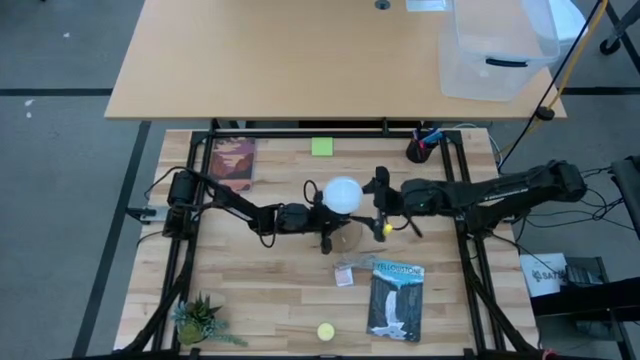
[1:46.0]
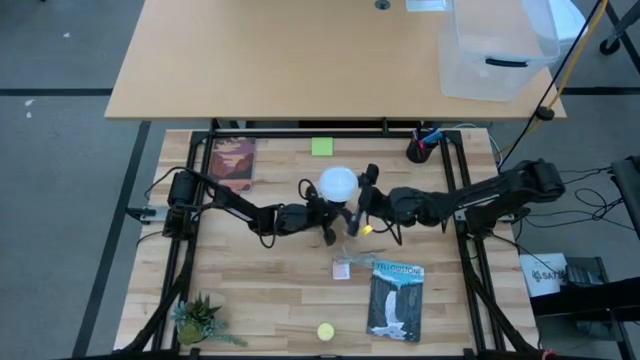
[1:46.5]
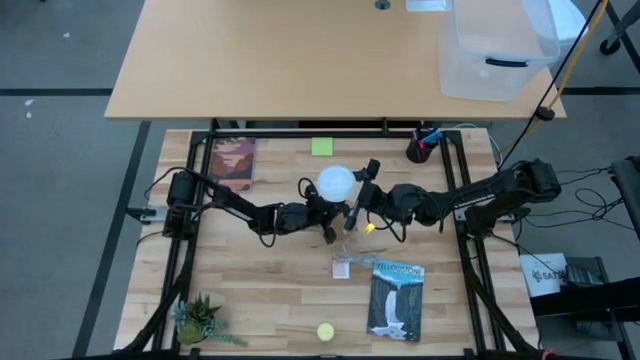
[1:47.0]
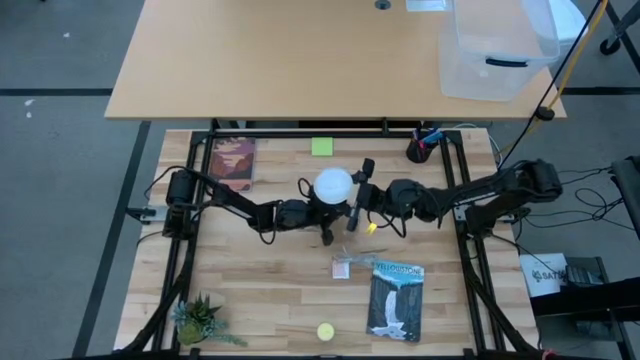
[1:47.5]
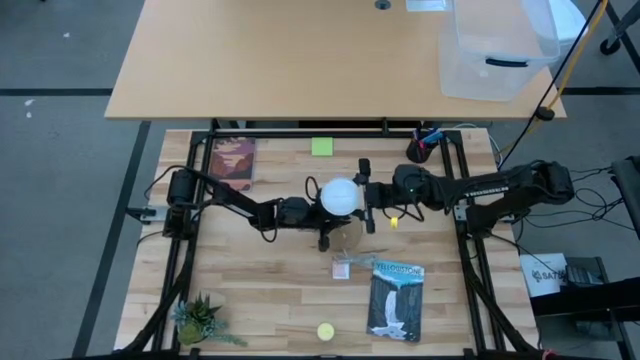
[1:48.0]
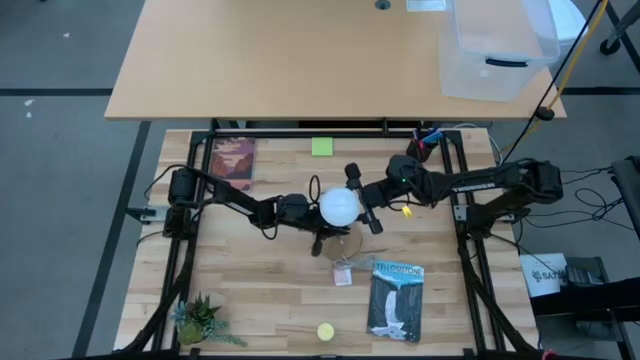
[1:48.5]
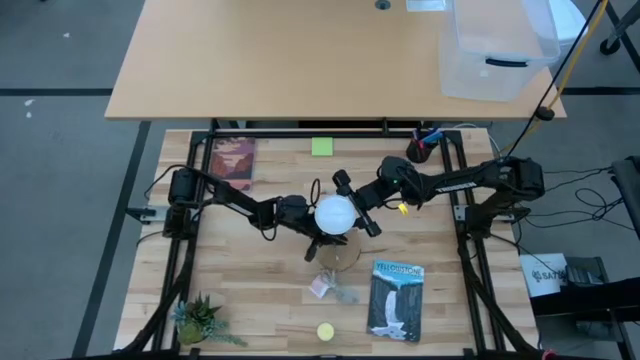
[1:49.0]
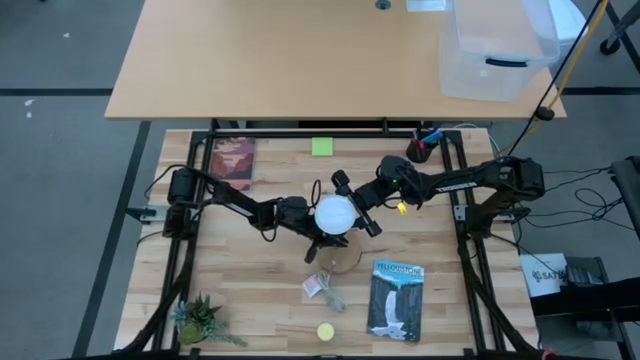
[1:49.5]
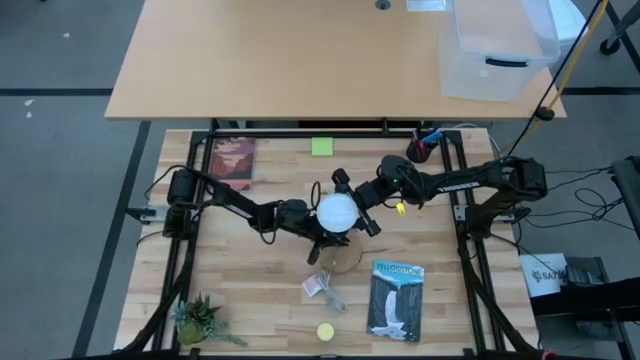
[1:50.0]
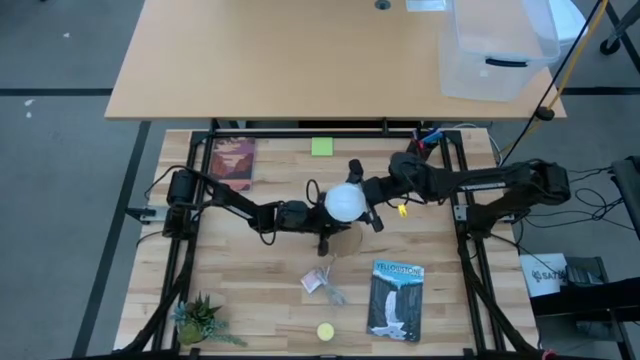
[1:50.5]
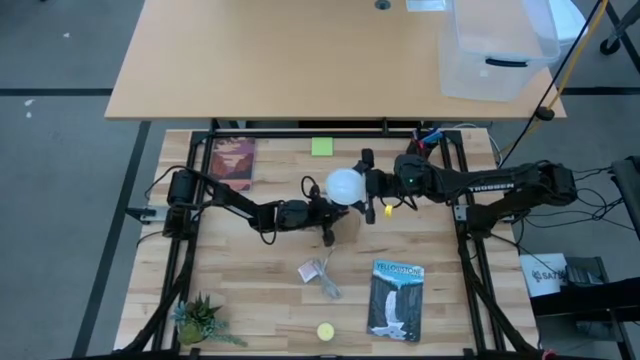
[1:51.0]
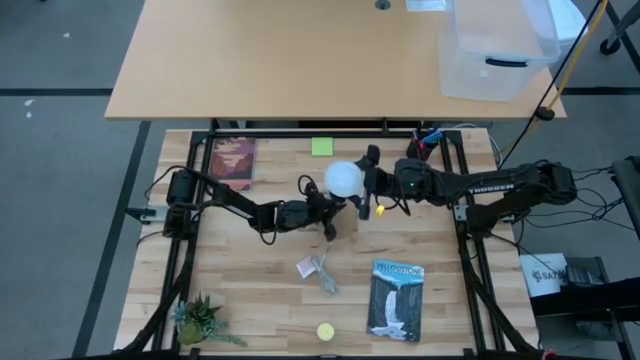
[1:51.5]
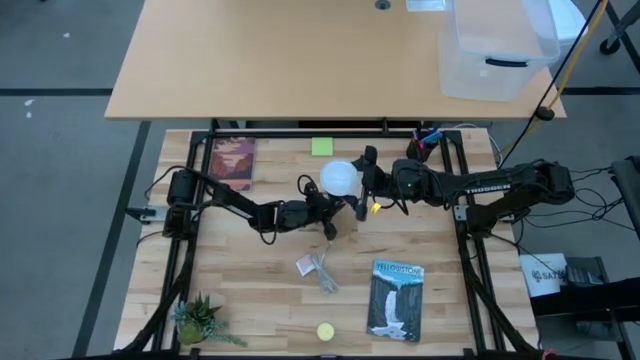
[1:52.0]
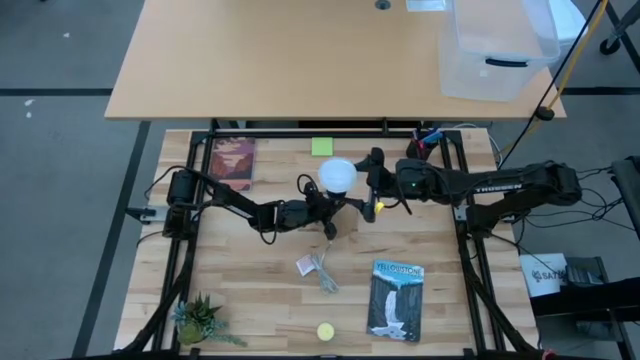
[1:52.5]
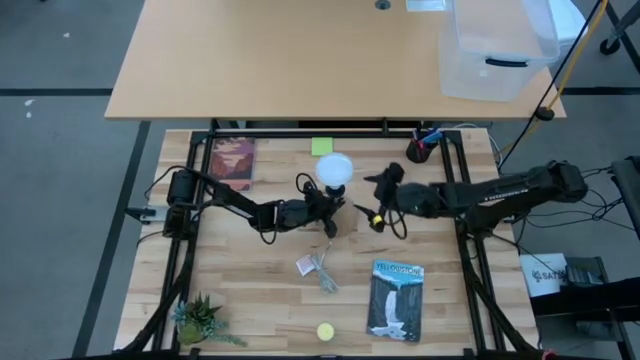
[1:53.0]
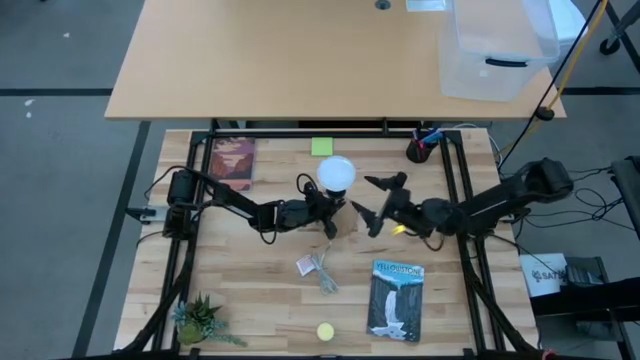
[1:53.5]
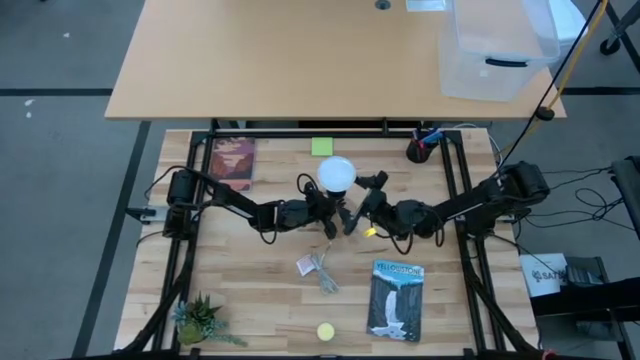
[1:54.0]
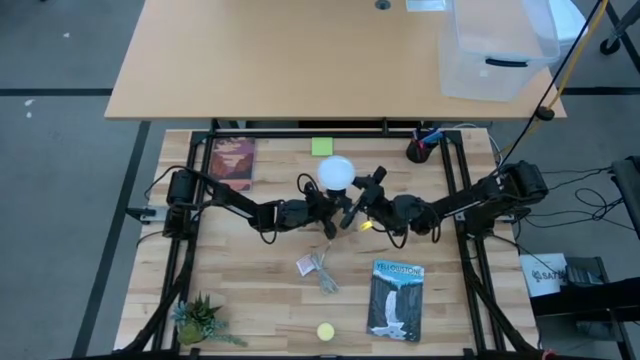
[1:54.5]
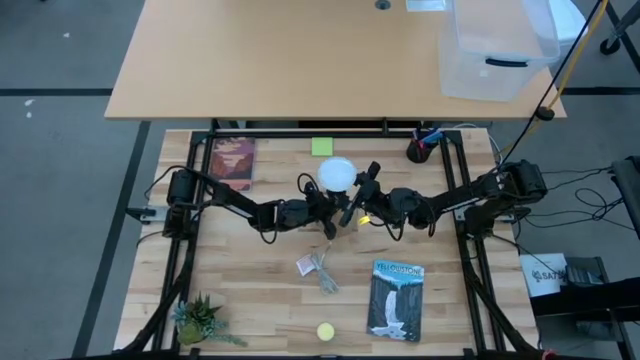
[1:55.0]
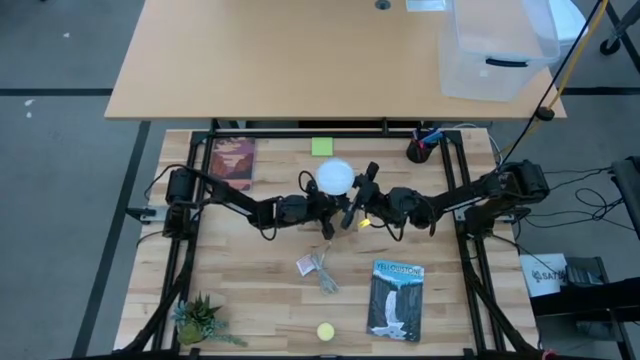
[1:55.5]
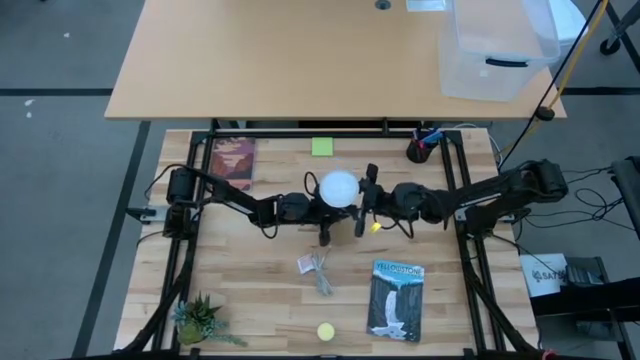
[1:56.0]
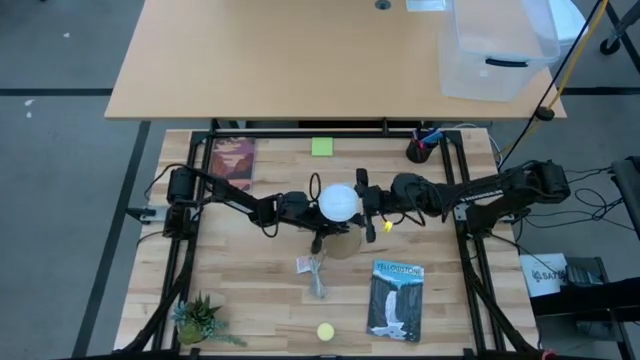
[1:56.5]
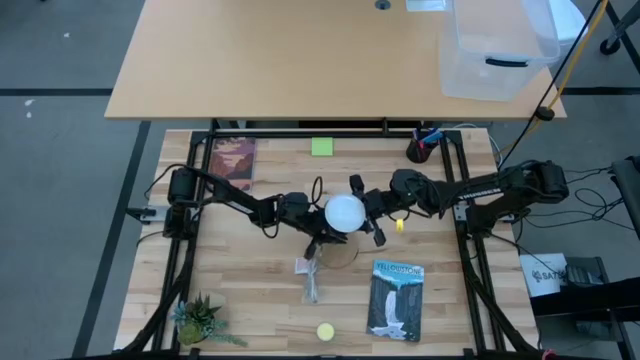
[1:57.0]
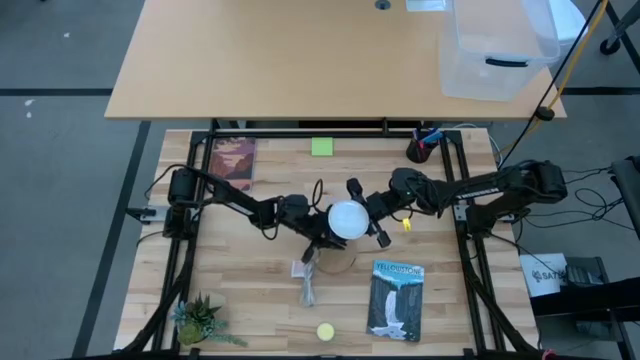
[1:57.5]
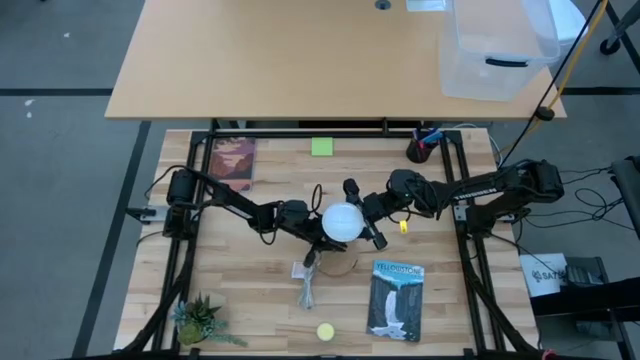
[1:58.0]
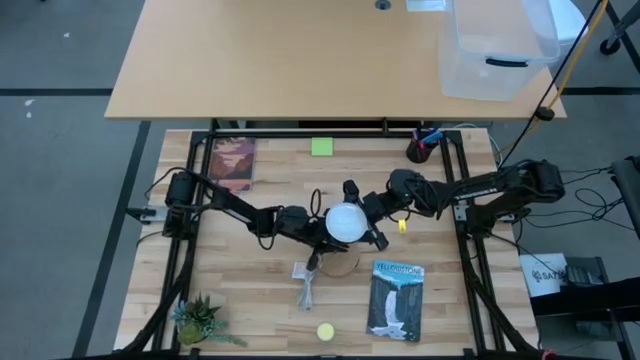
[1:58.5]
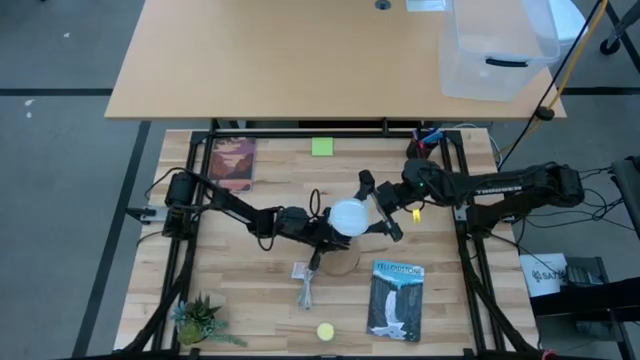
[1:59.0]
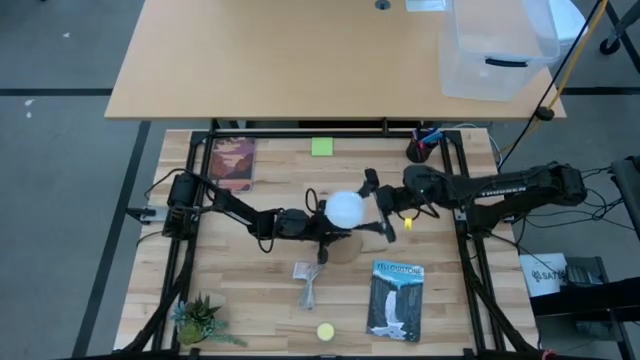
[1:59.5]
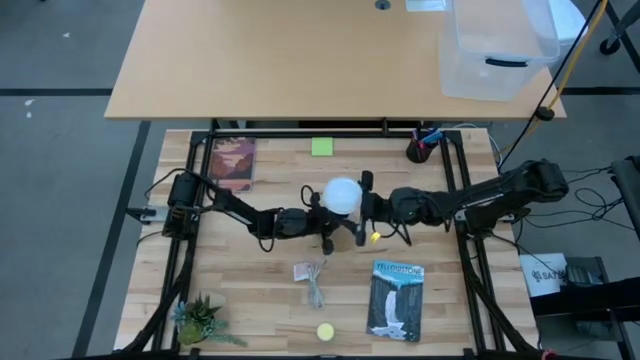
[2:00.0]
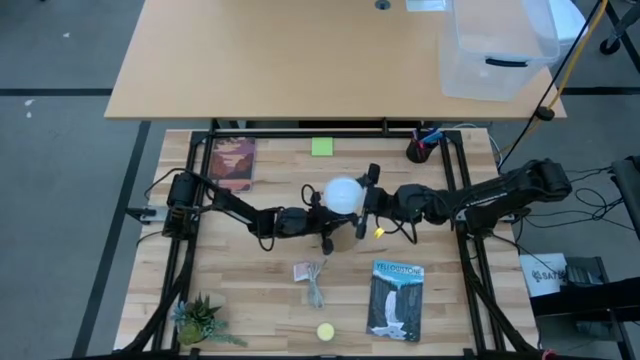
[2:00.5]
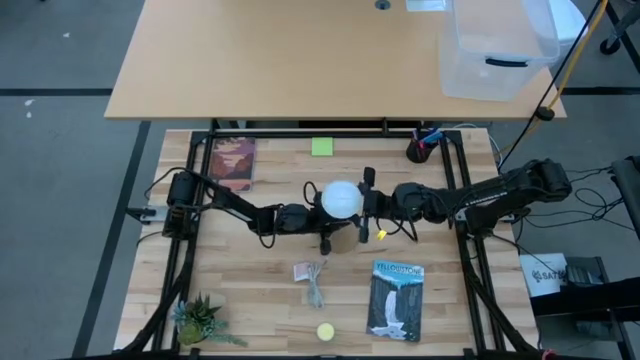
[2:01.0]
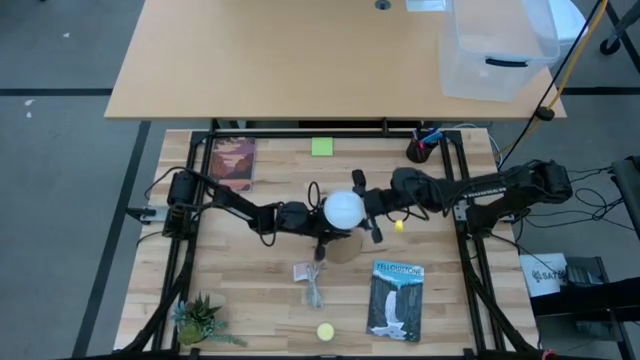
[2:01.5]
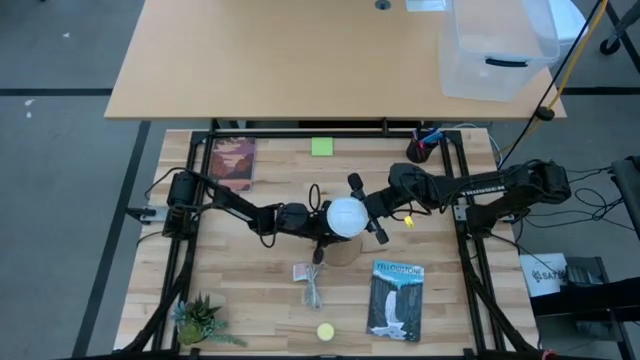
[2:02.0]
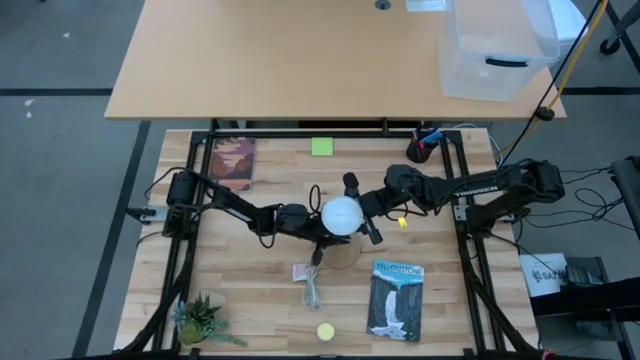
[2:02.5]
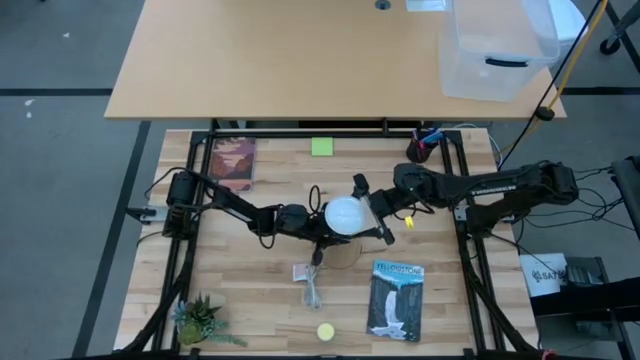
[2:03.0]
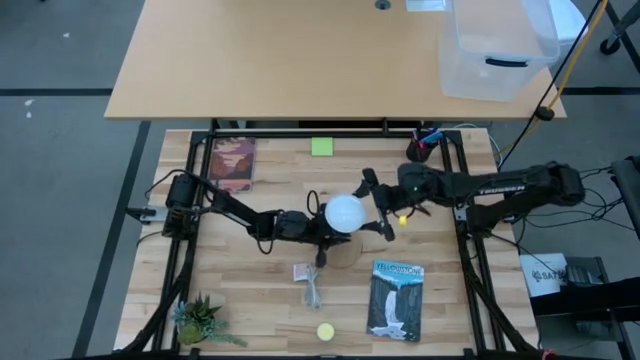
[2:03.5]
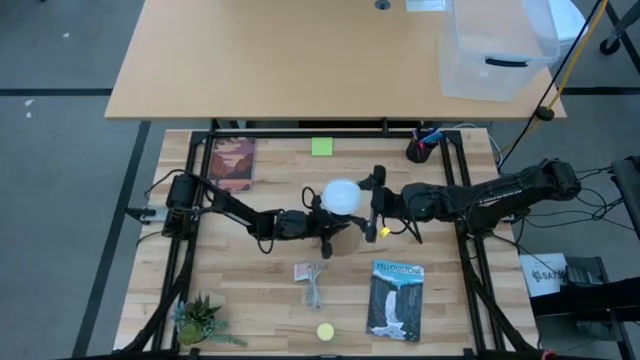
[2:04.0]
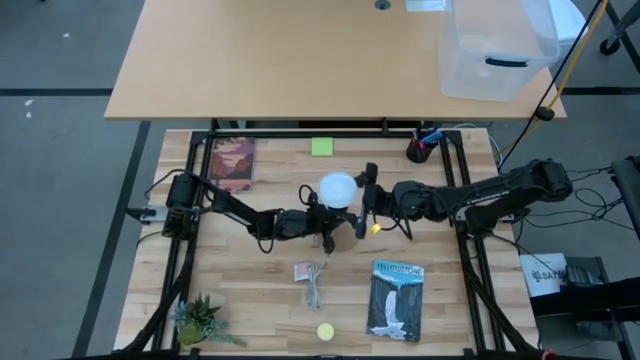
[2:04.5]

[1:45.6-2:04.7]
Task: Screw lightbulb
Remove the white lightbulb from the brown lamp

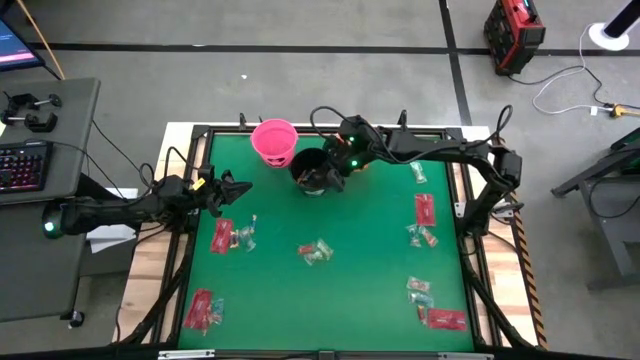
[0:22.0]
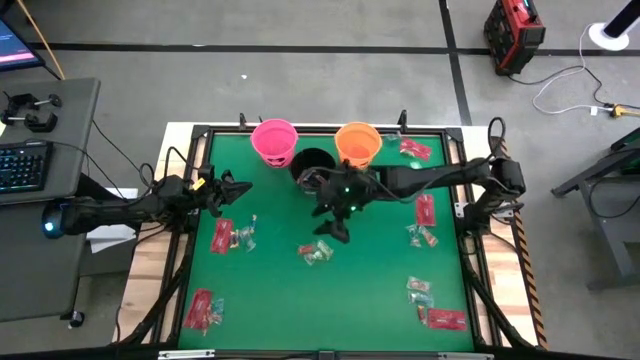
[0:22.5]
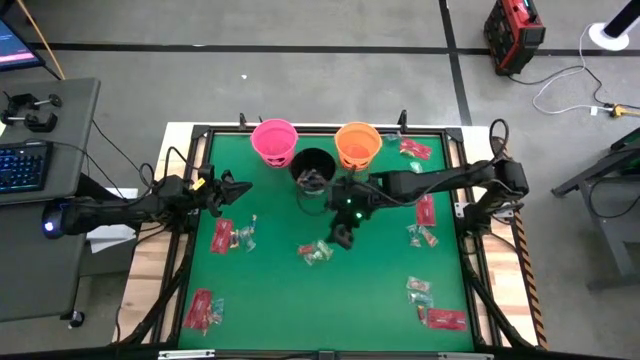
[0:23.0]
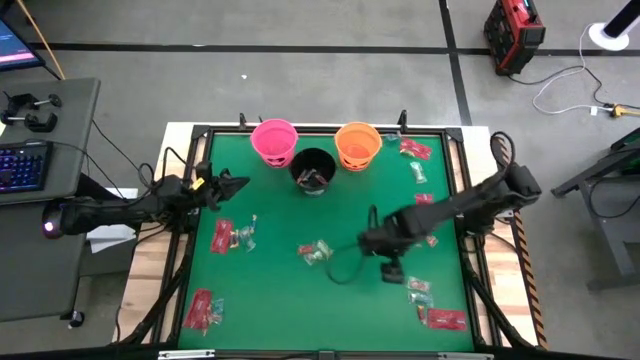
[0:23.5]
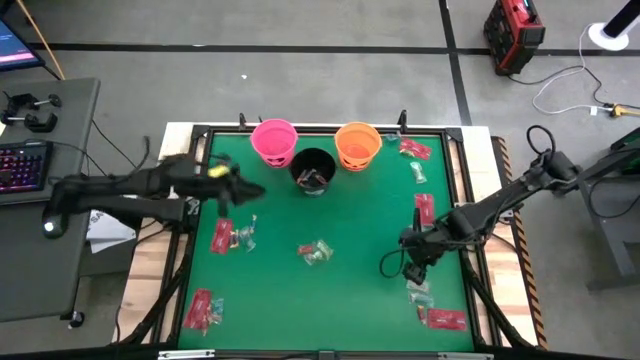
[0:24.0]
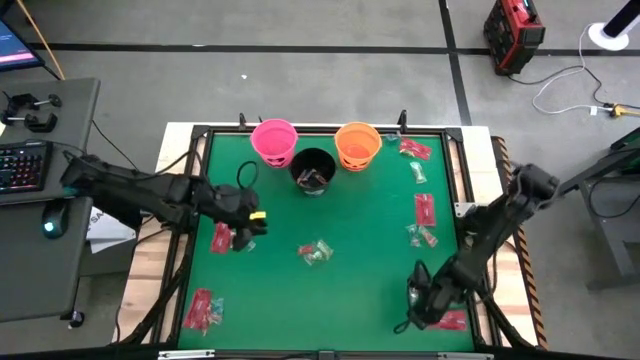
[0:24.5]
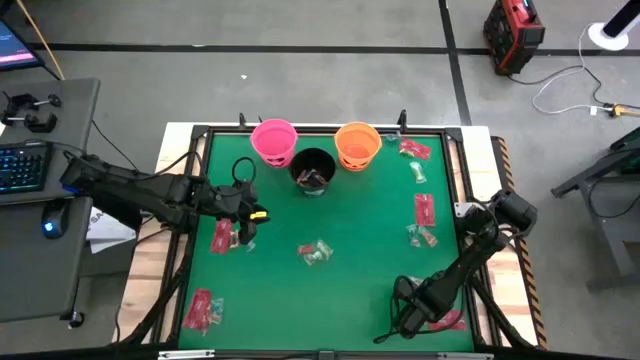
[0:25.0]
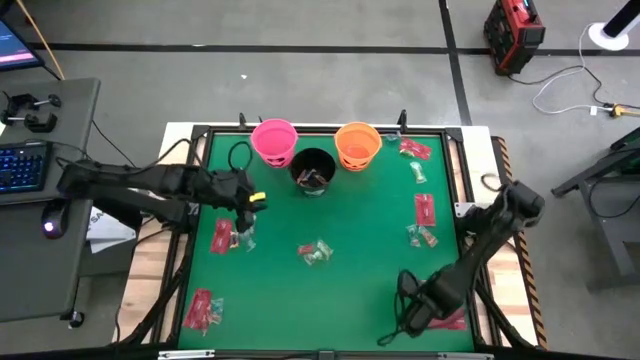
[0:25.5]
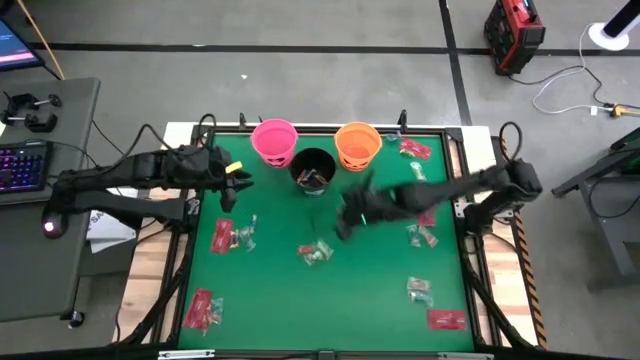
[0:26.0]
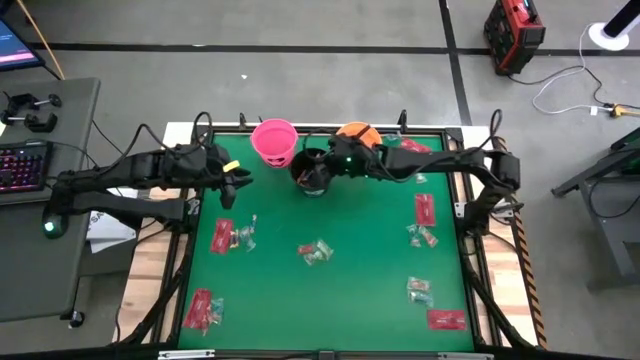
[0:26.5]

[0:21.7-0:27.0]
Task: Sort candy by brand, put in halloween buckets
Put the orange candy into the black bucket
